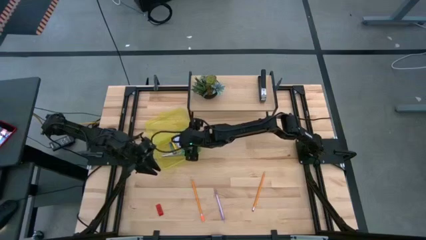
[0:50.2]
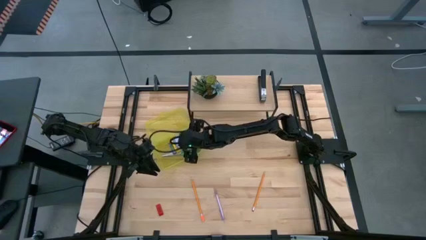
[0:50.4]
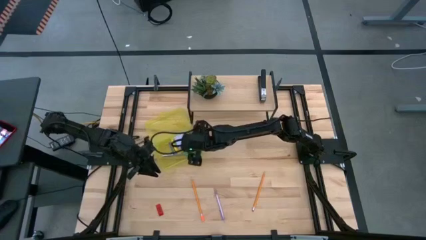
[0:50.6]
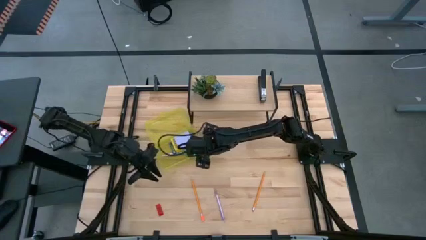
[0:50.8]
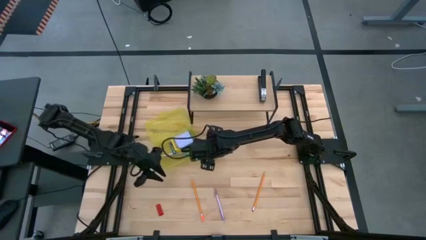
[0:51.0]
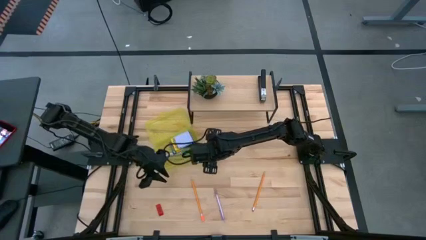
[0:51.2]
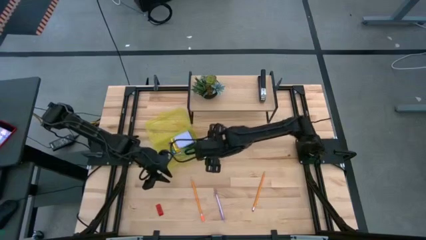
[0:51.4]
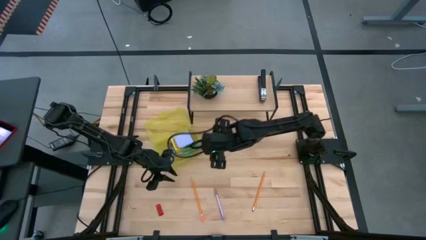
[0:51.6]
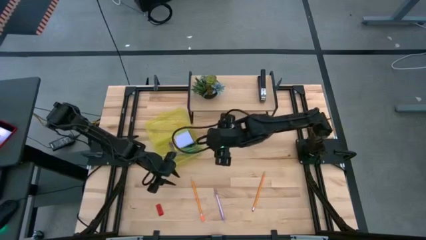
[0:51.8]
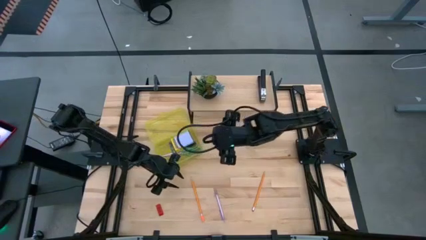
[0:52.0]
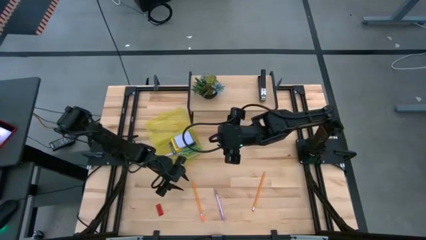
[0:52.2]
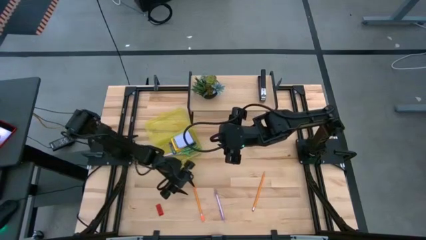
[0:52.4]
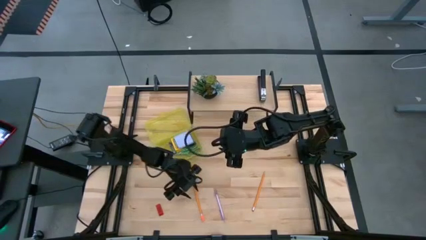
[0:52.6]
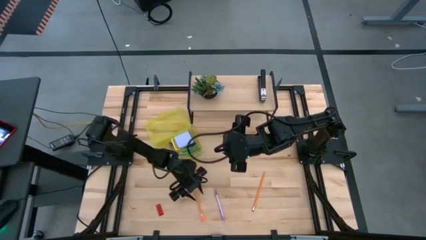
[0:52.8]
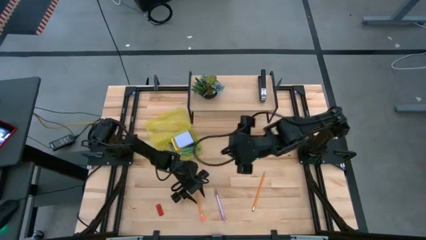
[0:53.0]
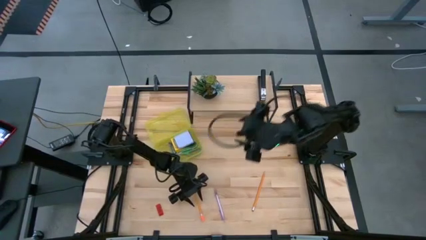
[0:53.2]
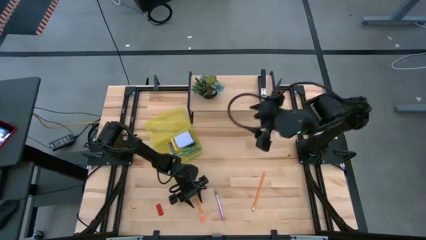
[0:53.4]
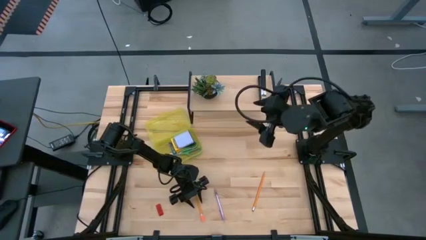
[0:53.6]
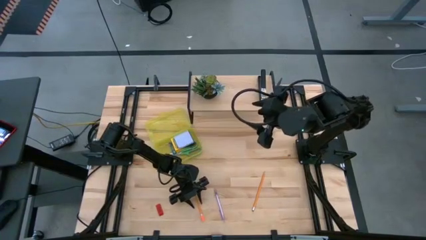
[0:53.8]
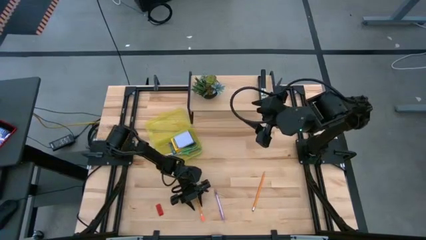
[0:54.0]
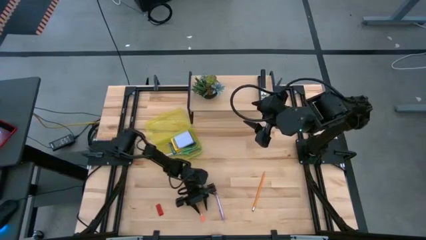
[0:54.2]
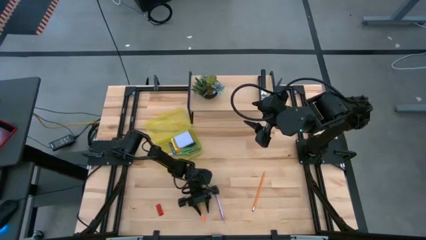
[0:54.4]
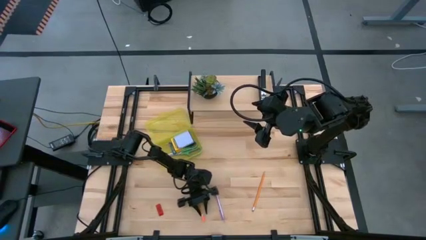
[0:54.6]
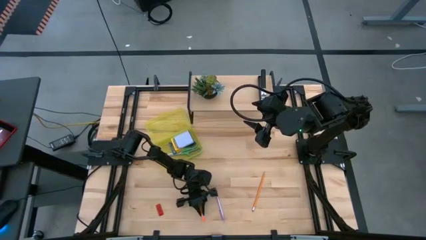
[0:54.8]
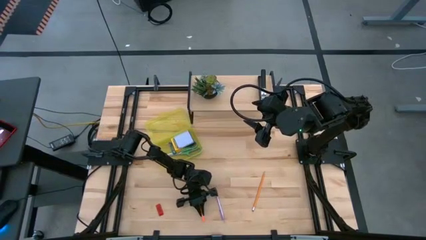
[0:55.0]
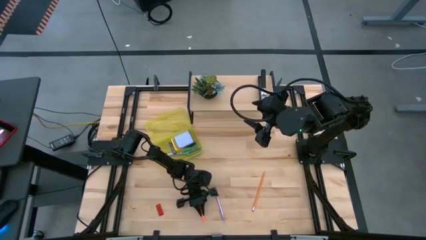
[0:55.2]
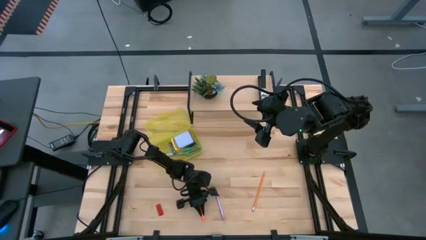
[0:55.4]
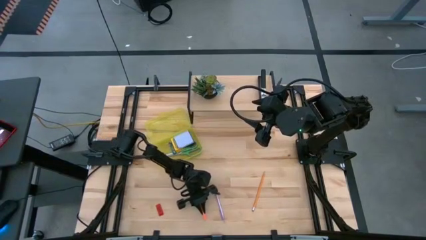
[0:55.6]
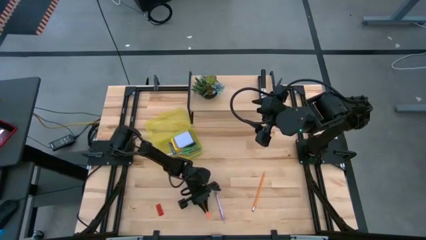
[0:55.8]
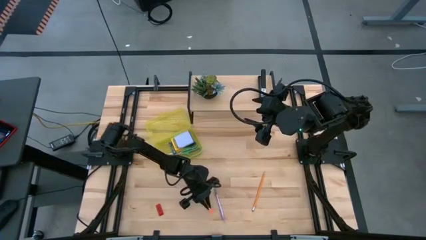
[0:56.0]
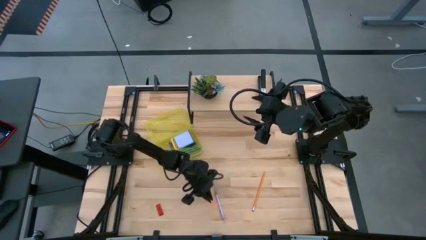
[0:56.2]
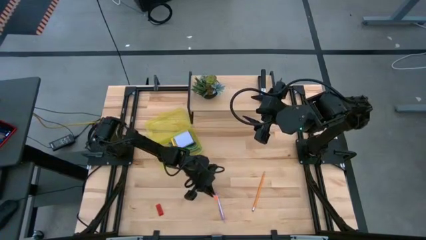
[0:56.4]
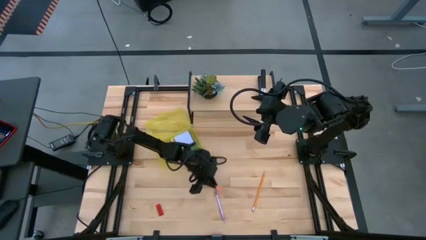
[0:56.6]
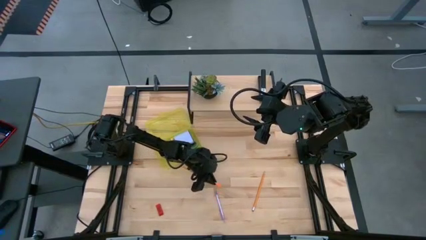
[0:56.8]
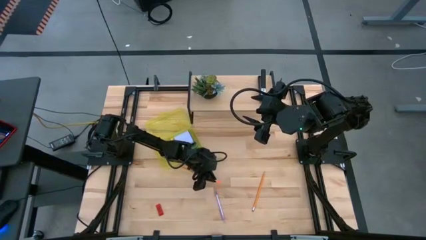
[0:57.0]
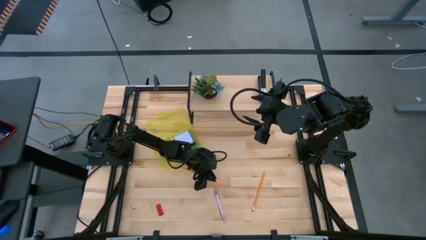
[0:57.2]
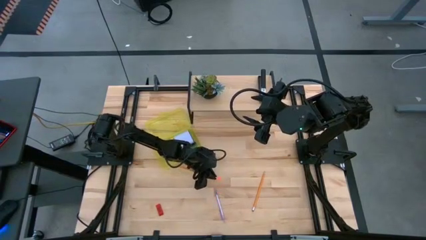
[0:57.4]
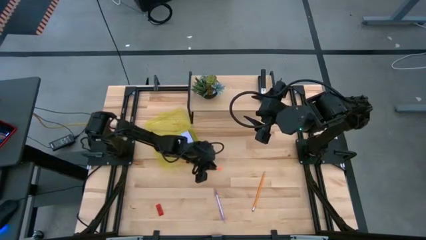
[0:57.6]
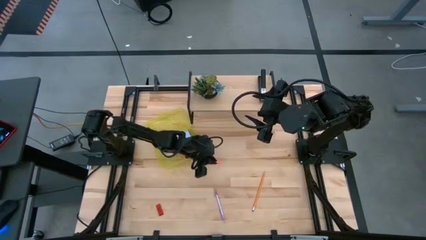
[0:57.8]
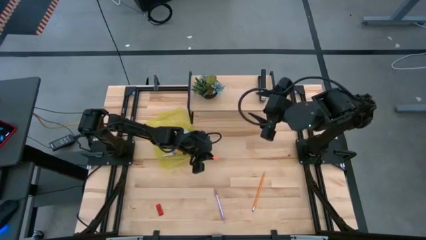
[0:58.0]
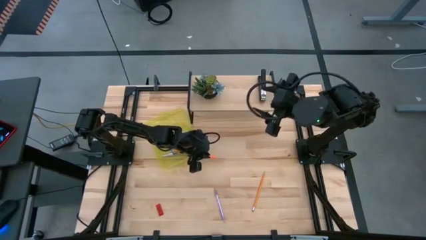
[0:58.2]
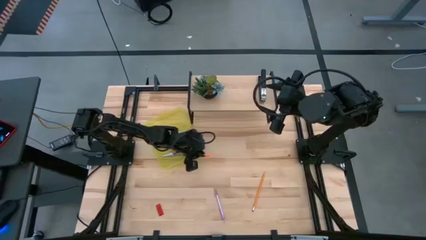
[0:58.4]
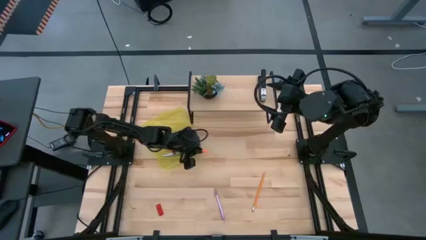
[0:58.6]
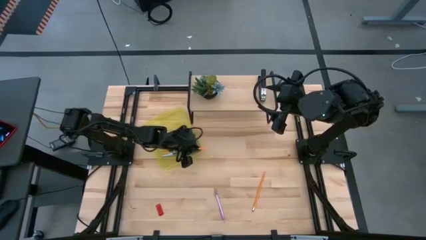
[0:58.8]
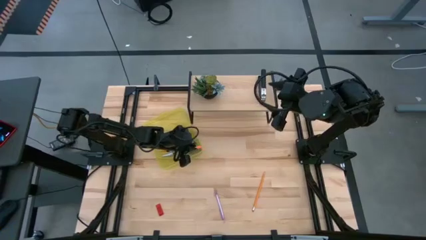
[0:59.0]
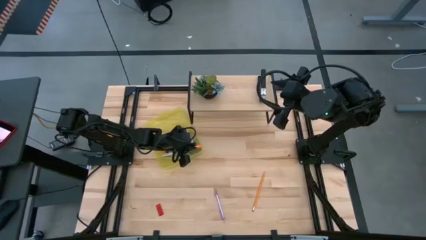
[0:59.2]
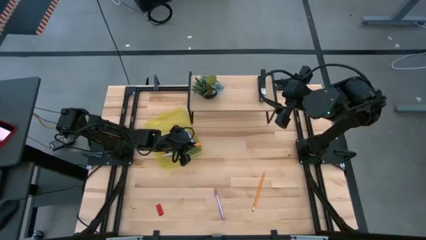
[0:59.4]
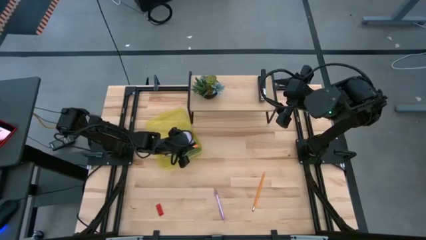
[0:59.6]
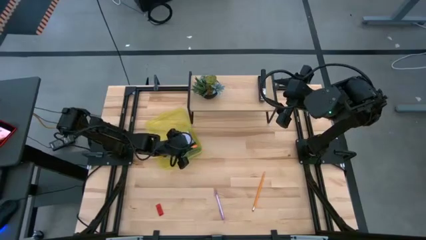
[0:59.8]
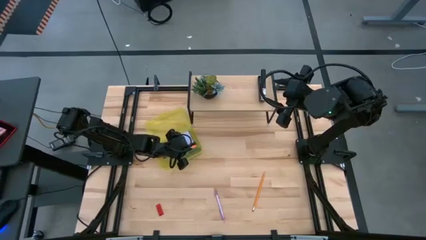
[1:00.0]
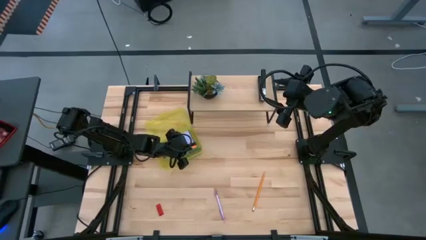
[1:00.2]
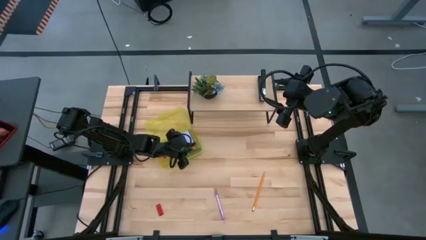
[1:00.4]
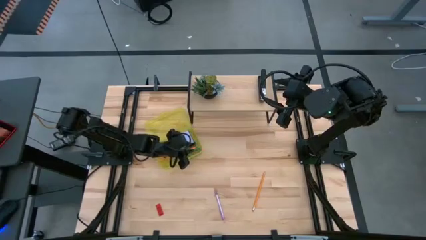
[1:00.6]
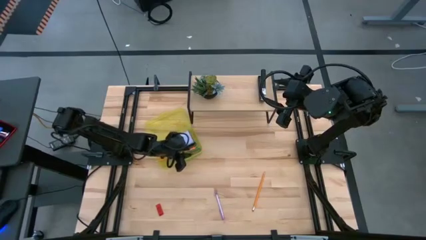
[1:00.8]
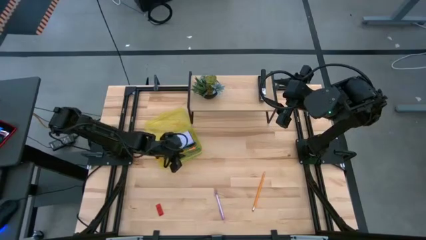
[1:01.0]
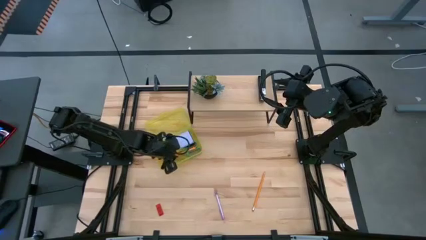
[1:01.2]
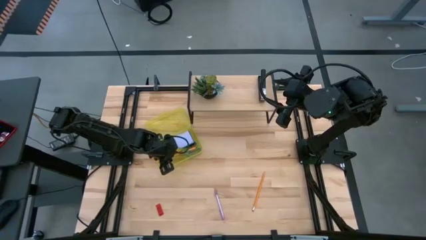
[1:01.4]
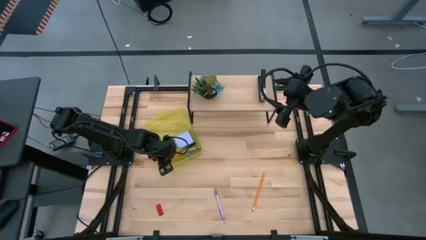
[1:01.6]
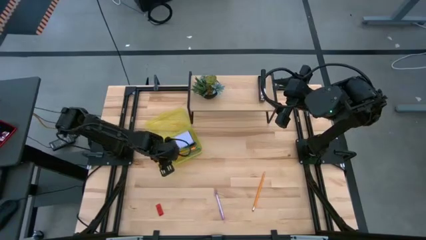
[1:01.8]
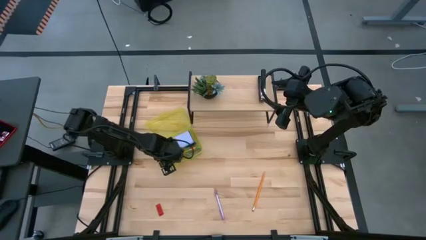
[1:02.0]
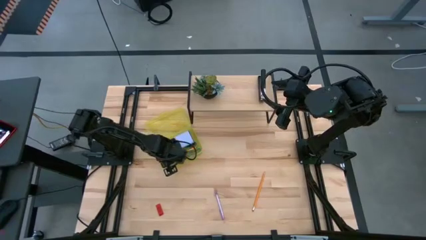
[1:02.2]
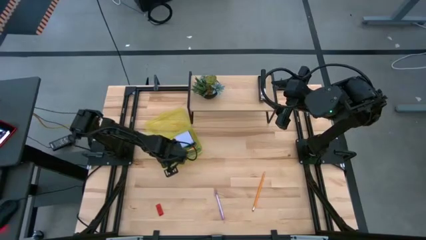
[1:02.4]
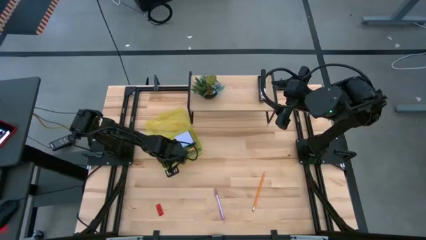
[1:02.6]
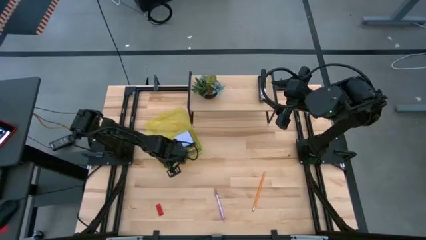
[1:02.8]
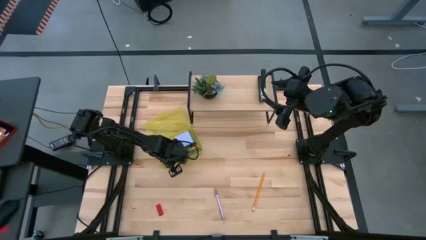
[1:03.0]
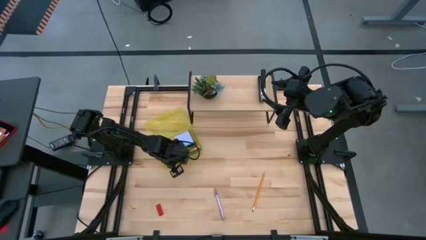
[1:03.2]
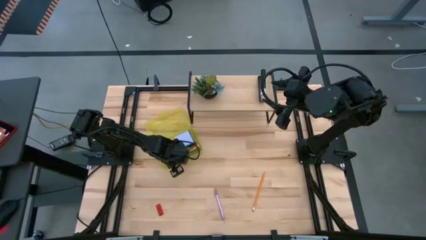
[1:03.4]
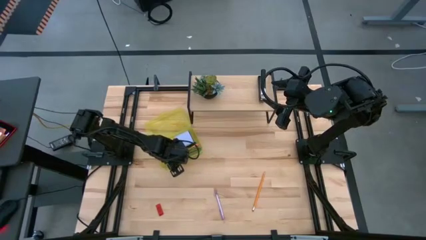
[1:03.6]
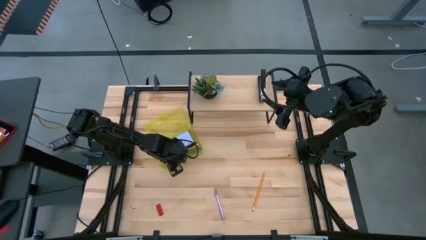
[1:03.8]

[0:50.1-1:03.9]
Task: Pack school essentials
Put the left orange pencil into the yellow supply box

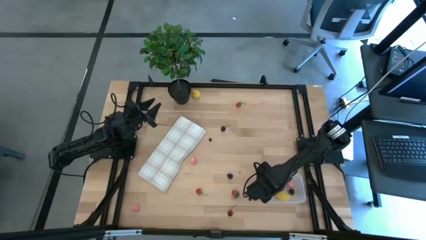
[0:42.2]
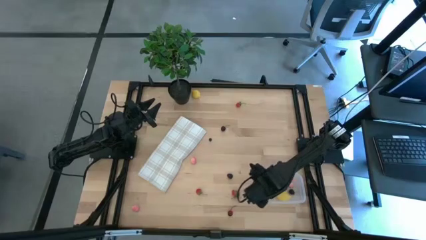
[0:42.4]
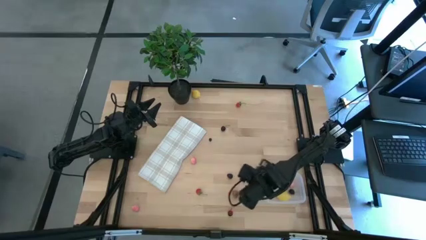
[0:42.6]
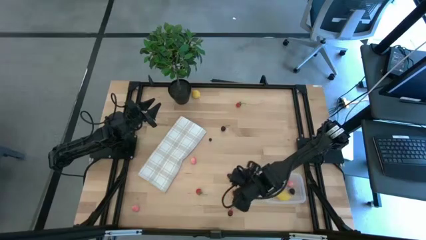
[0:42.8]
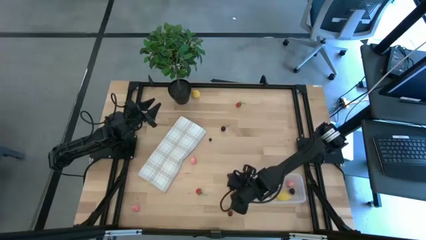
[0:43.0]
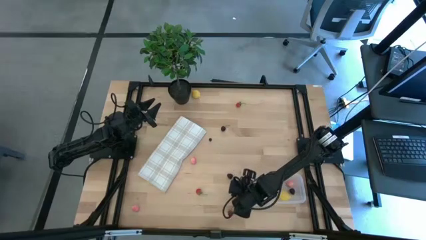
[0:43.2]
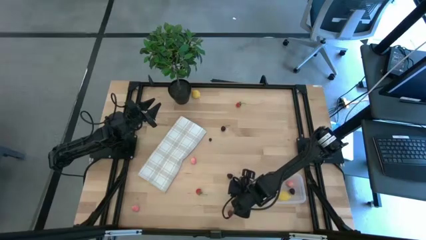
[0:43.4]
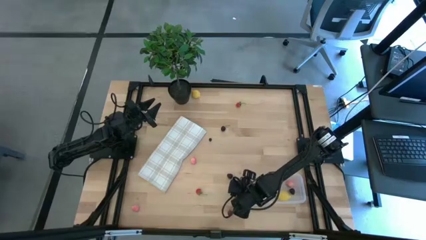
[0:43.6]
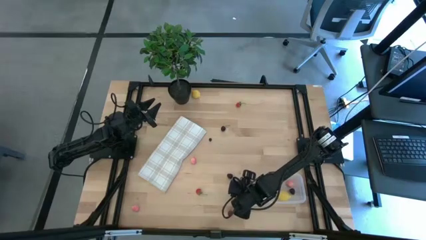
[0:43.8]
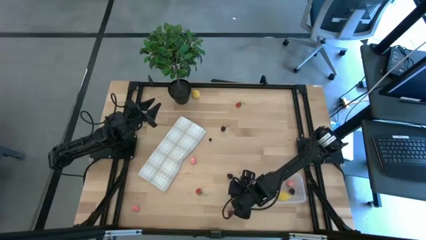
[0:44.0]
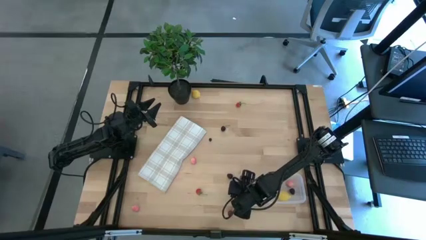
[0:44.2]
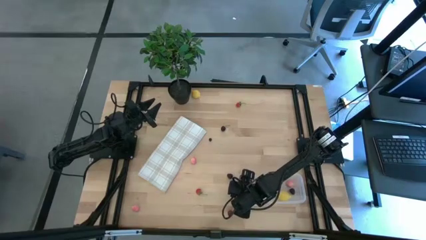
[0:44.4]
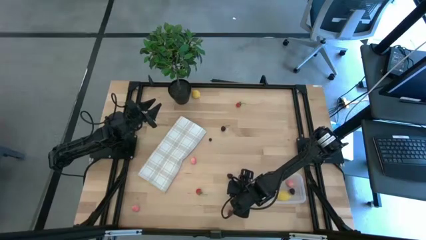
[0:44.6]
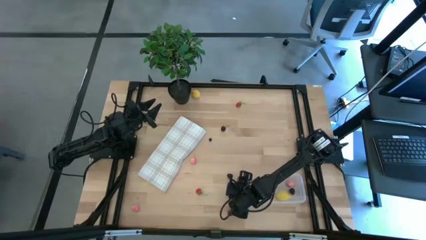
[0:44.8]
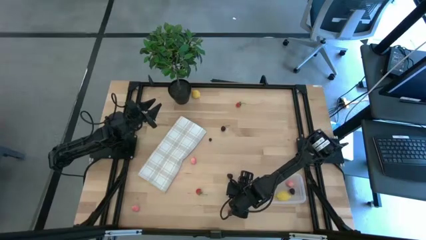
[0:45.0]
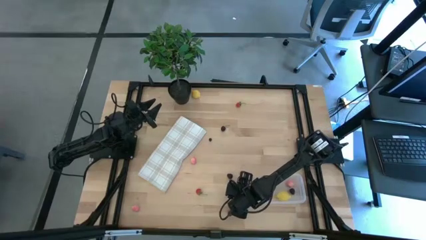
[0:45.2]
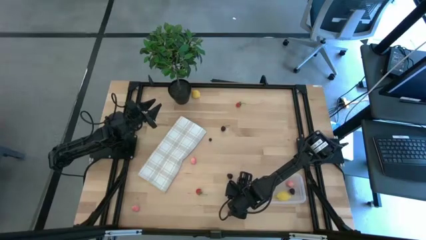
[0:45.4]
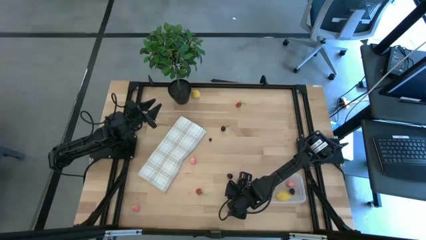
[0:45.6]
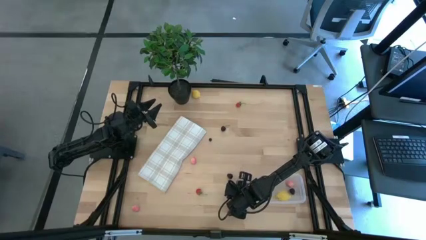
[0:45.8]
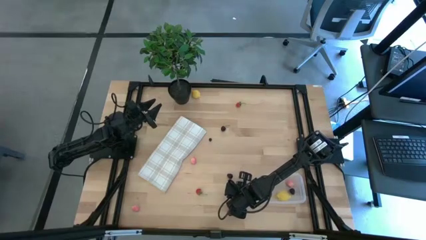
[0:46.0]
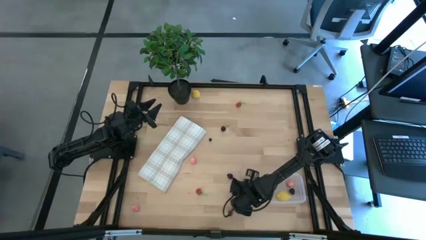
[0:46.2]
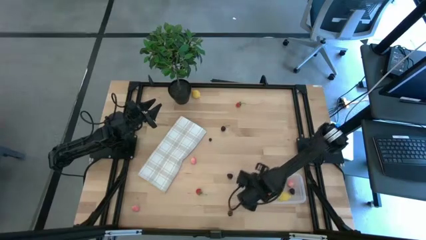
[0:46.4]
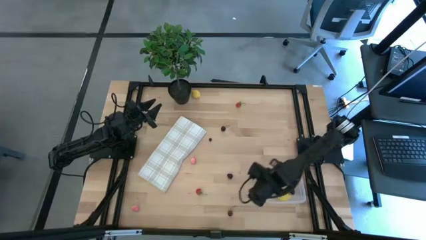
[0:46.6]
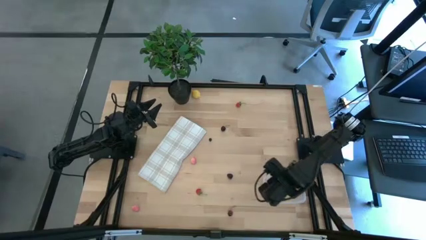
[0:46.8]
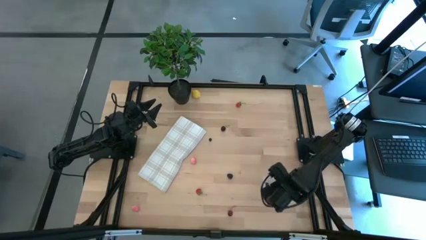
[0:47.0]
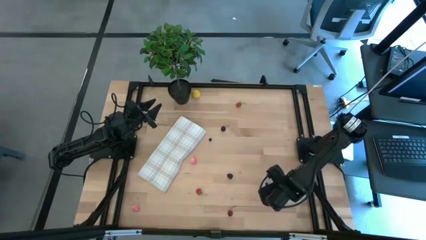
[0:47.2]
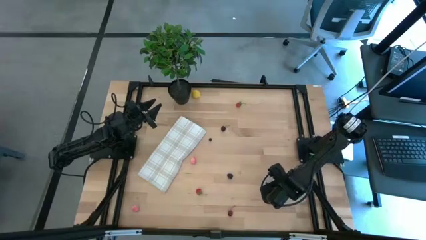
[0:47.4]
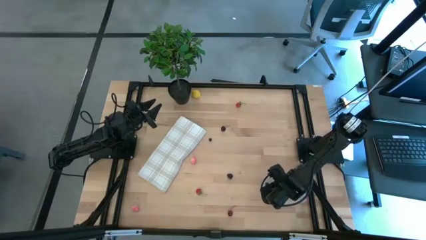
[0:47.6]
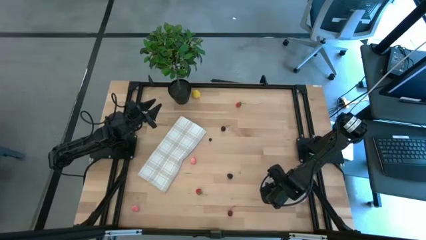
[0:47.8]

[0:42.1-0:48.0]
Task: Pick and placing Produce into tupperware
Put the bottom right strawberry into the transparent bin
